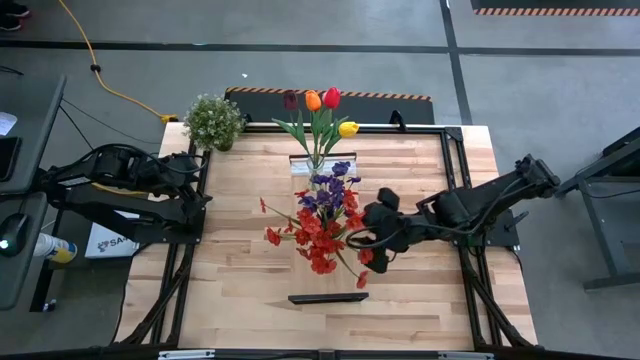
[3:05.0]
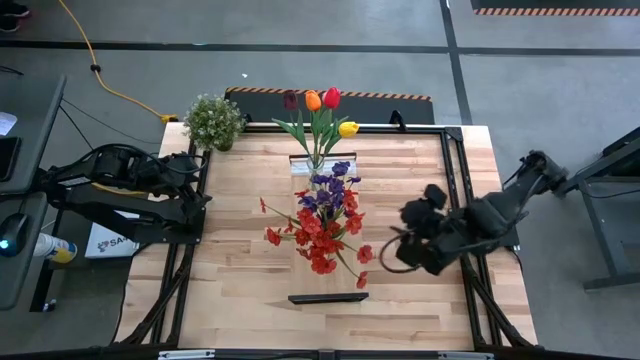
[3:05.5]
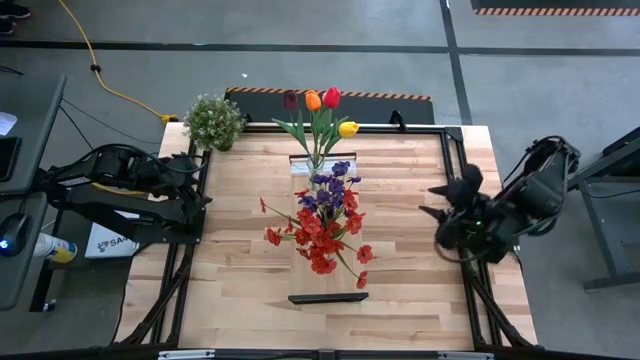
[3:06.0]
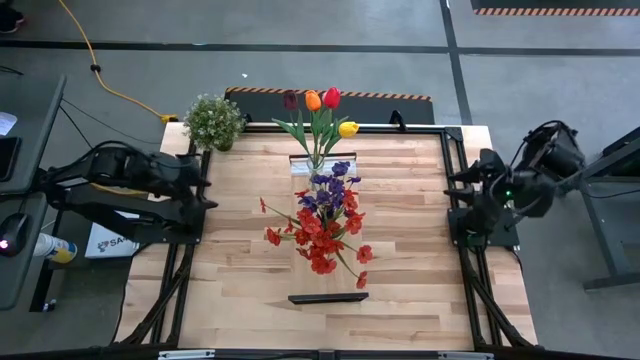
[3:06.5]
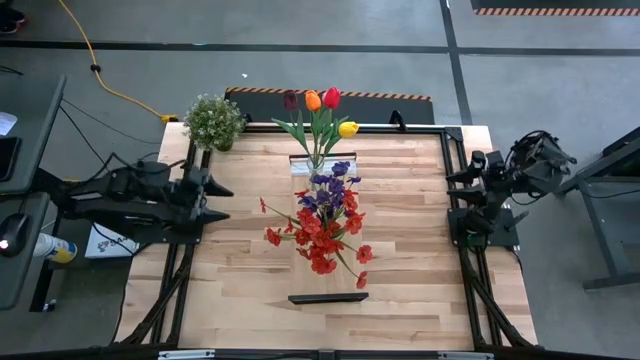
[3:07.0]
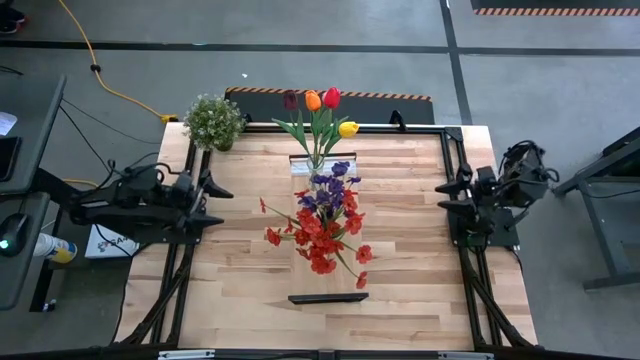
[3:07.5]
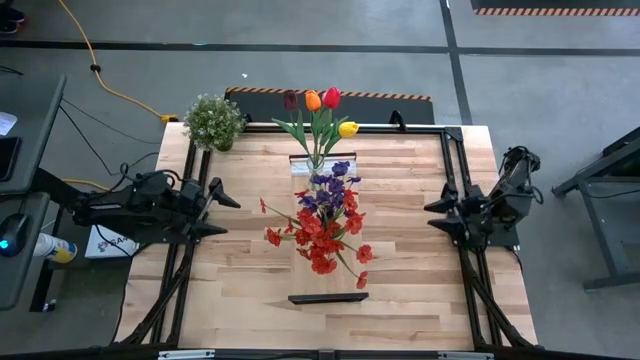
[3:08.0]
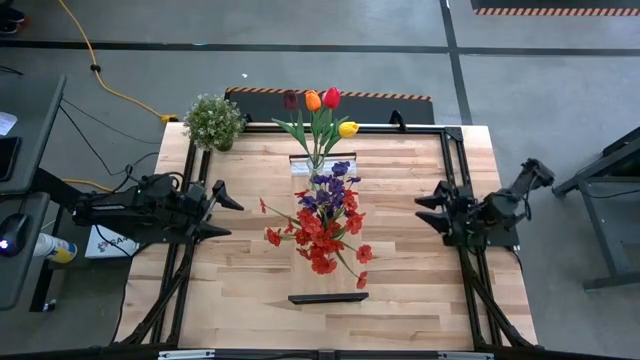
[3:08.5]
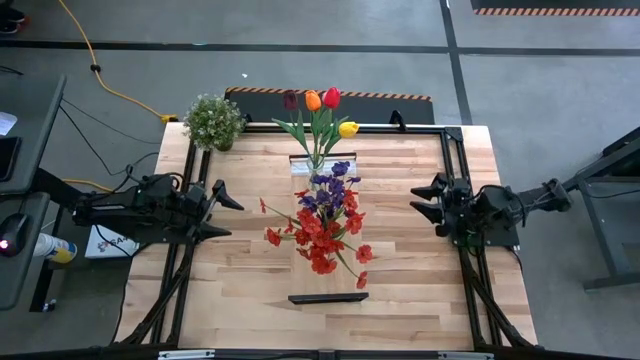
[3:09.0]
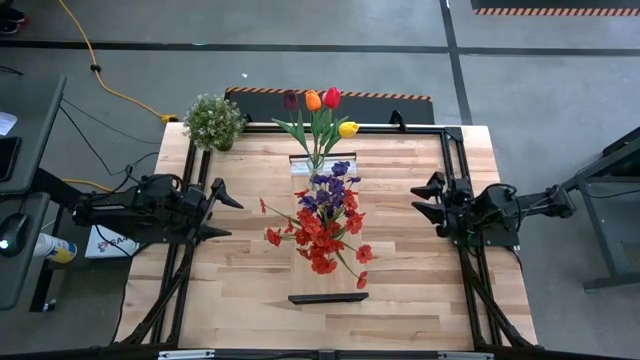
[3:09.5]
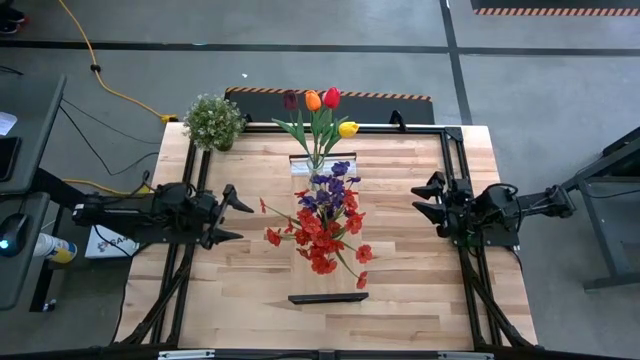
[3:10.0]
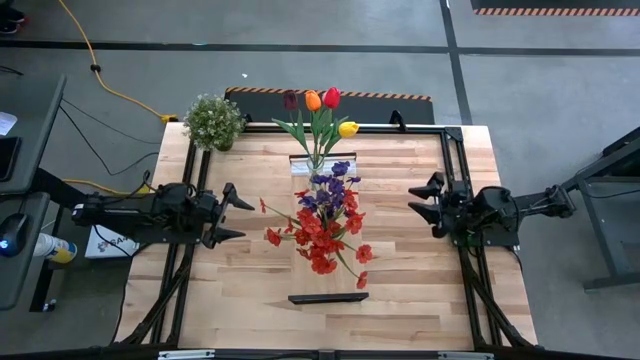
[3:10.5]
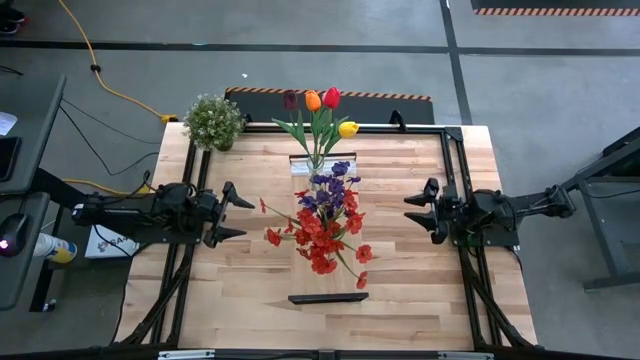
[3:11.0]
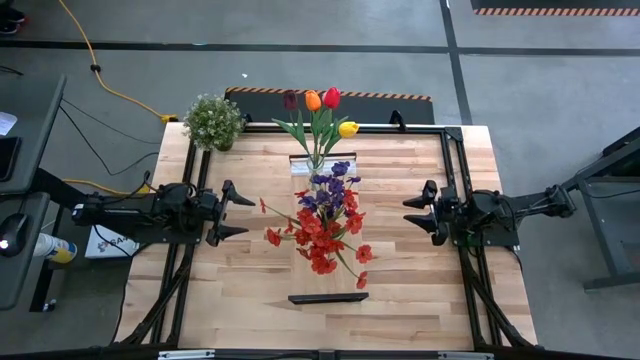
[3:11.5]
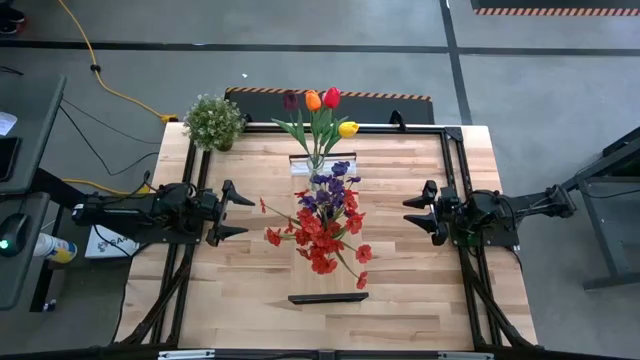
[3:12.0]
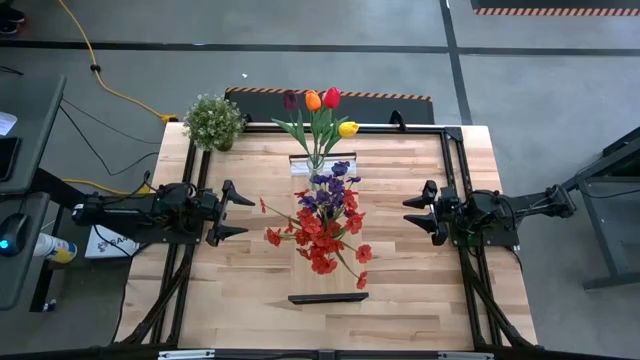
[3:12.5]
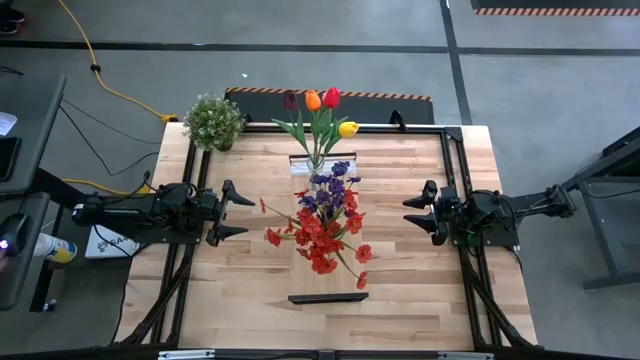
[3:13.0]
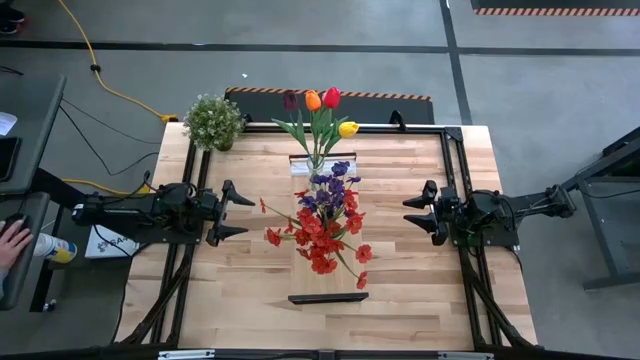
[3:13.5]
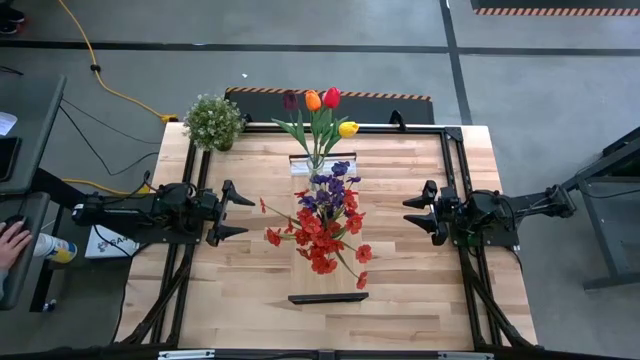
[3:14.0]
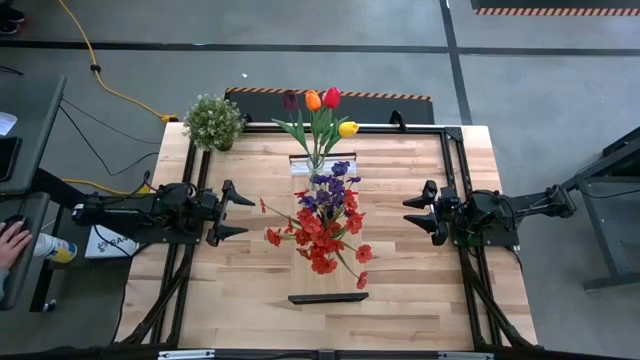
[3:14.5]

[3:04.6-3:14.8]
Task: Pick and place flowers into a vace then onto a shelf
Return to Home Position

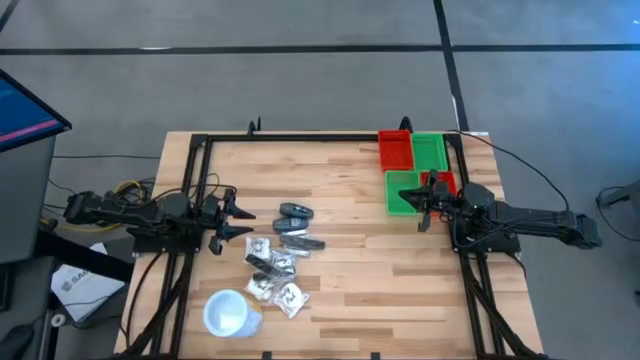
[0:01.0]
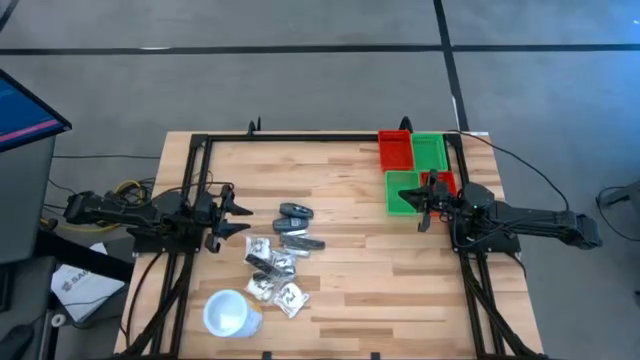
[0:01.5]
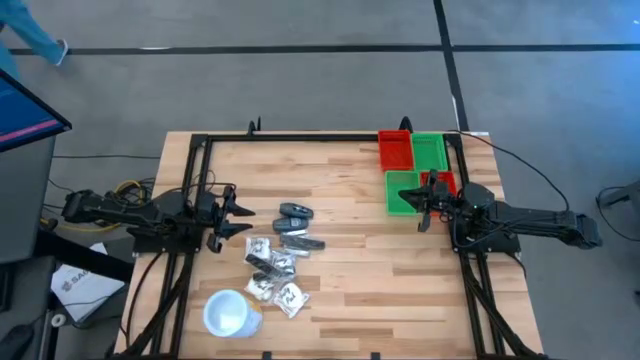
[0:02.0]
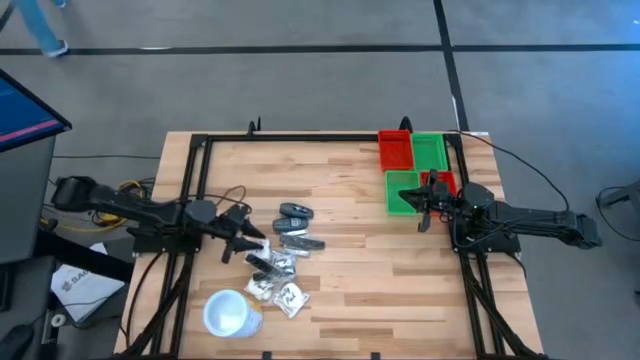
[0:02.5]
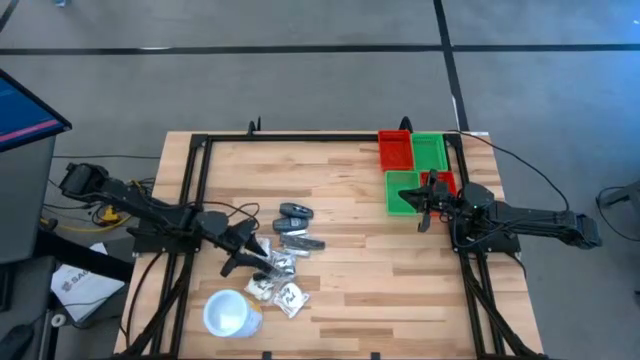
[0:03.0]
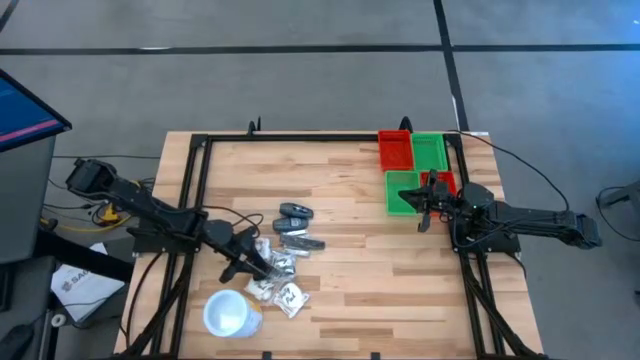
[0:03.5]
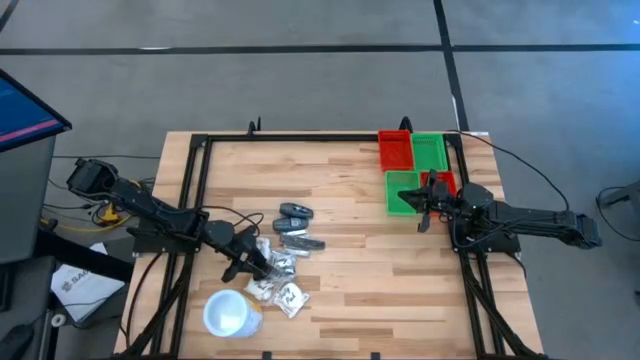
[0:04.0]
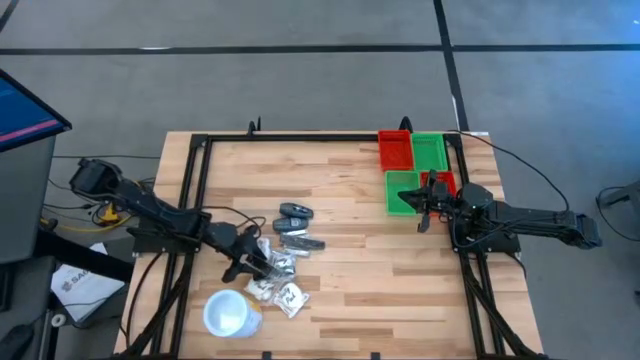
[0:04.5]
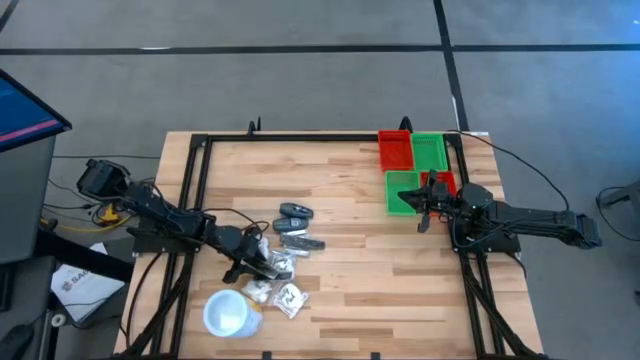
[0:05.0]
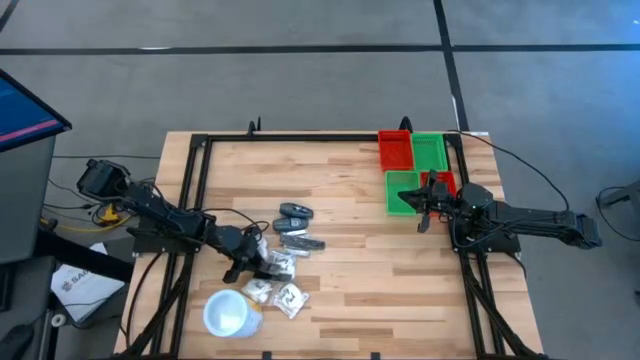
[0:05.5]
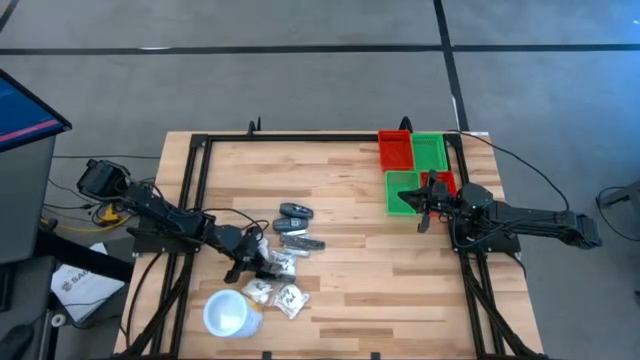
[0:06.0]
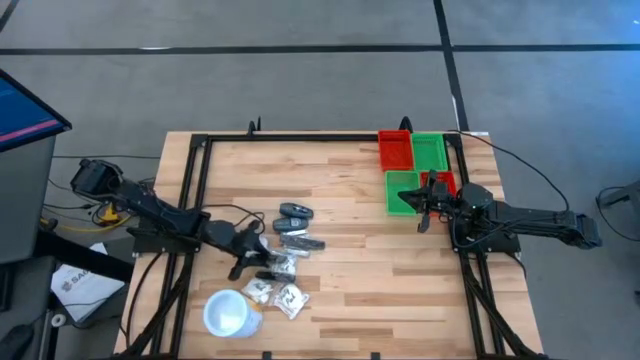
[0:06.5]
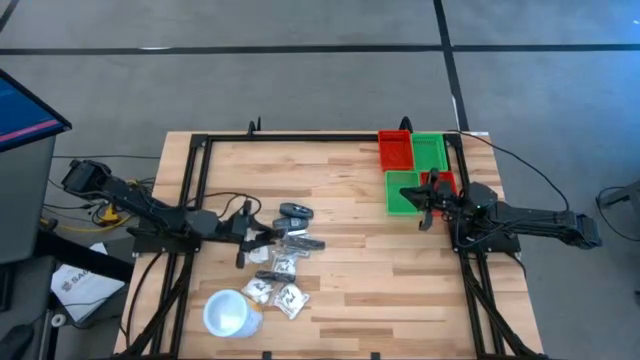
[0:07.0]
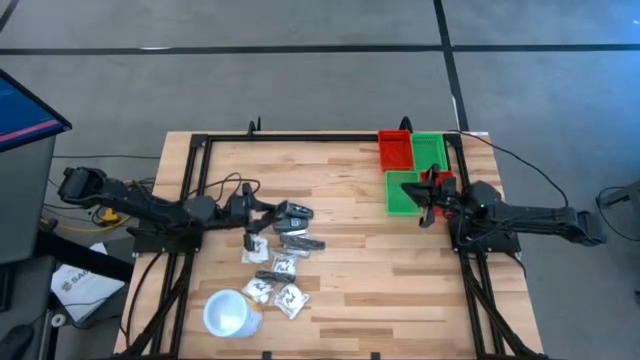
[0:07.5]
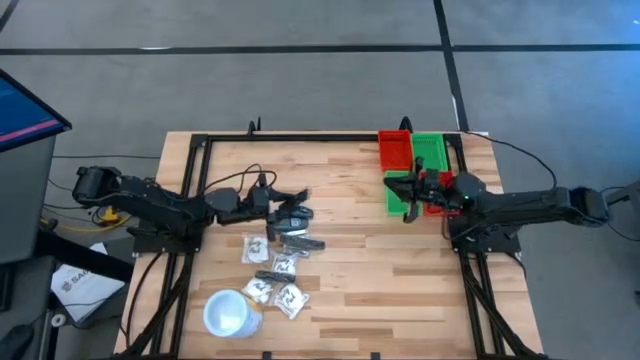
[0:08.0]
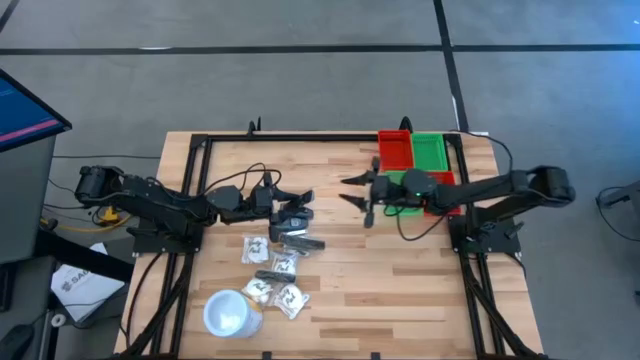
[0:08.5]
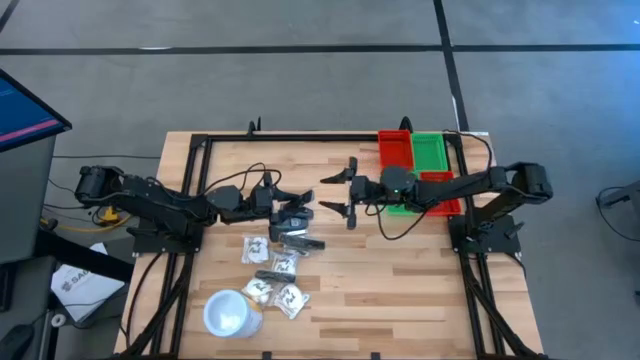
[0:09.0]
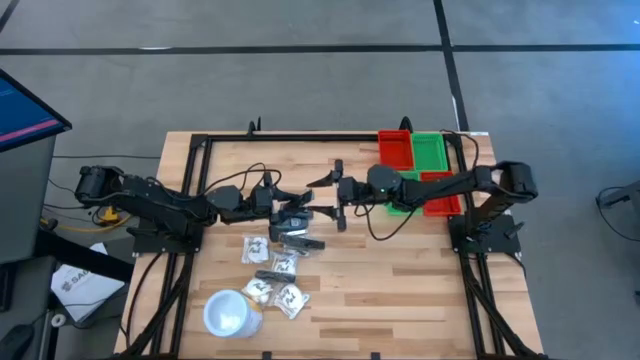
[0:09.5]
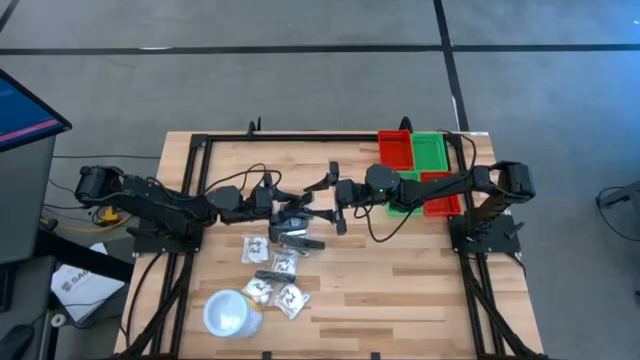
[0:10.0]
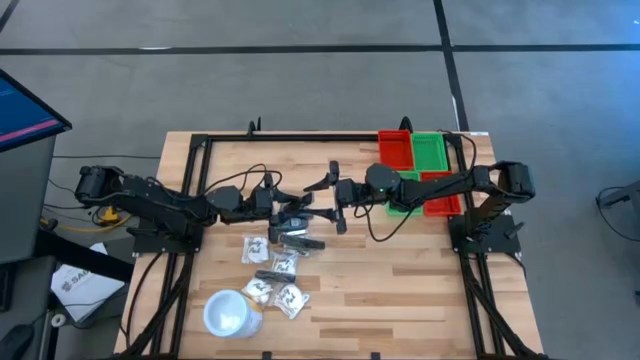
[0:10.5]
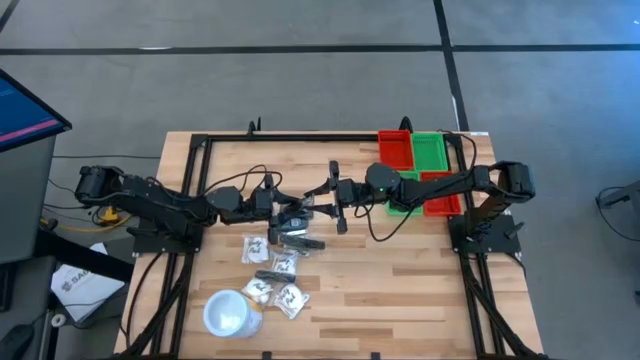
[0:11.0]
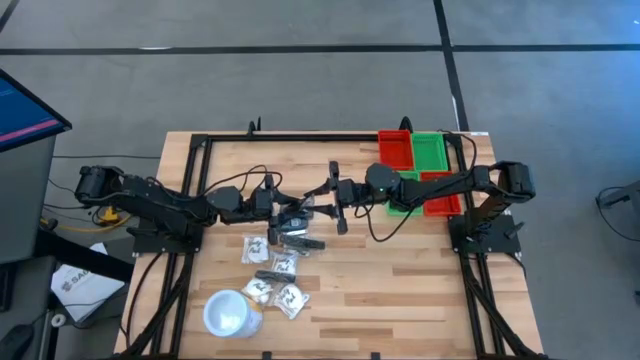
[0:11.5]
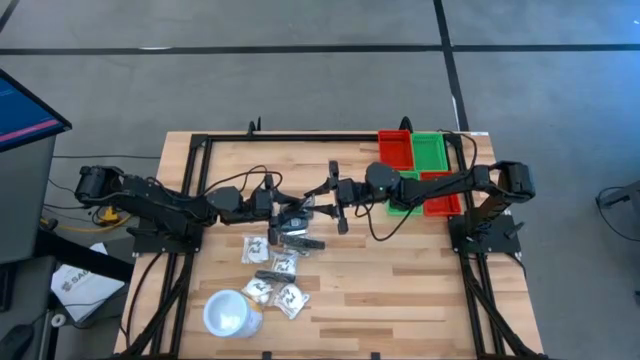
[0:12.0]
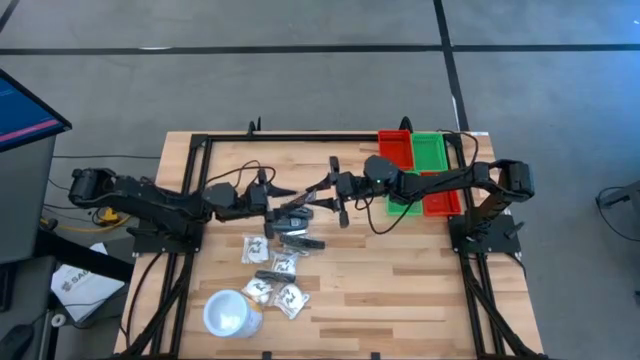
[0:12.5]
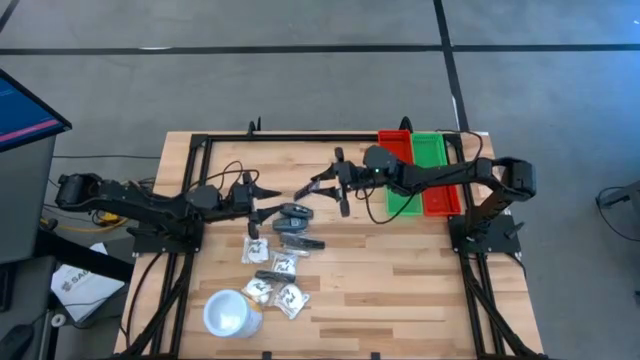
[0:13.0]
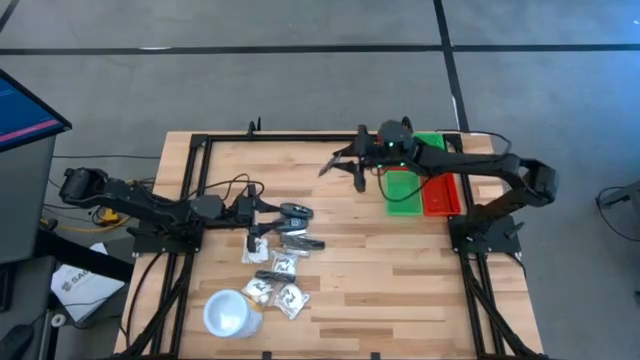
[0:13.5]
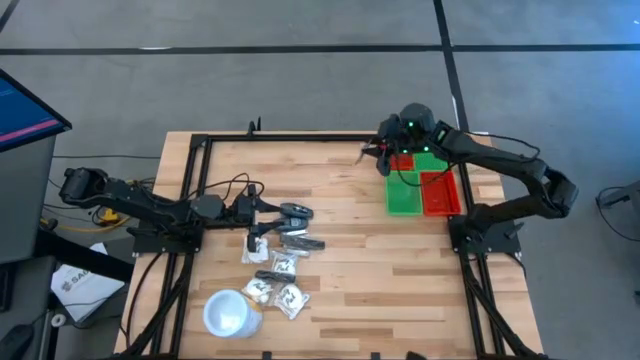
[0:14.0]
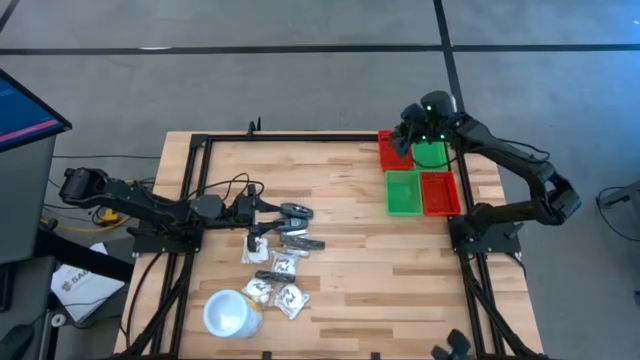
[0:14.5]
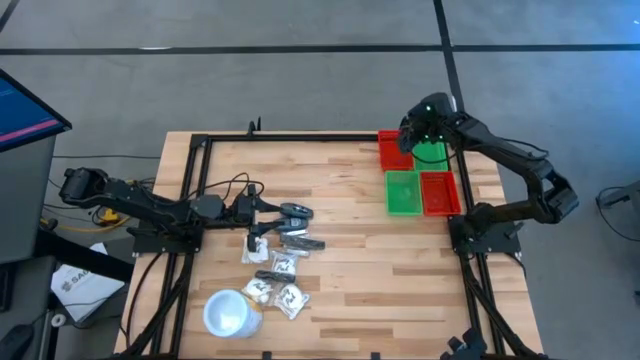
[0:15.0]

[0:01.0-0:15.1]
Task: Pick & Place Travel size toiletries
Put the black hair comb into the top red bin
